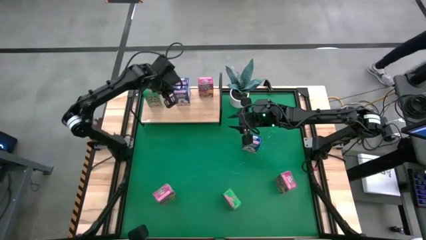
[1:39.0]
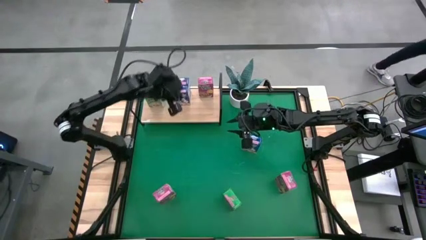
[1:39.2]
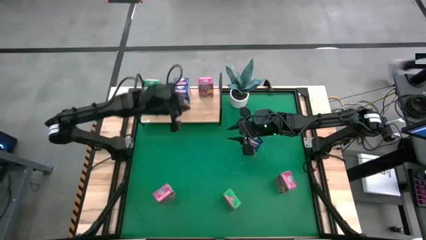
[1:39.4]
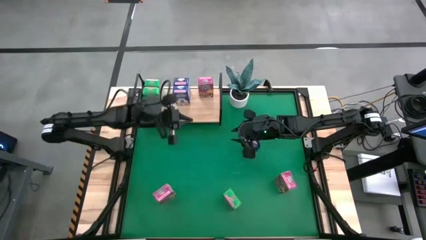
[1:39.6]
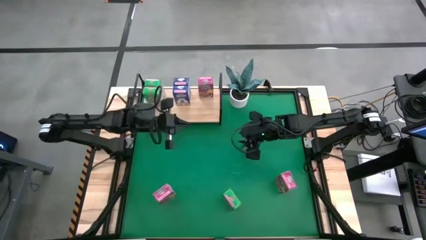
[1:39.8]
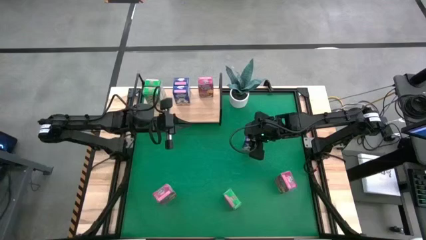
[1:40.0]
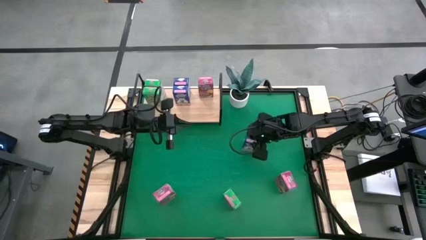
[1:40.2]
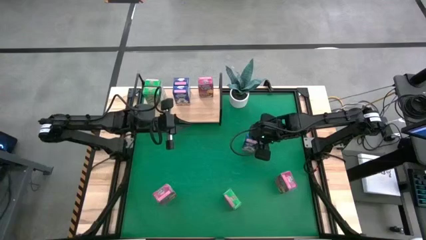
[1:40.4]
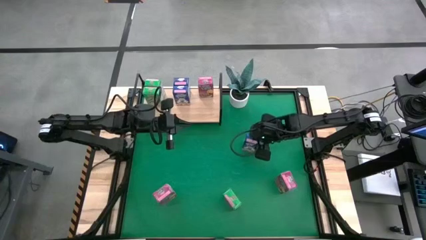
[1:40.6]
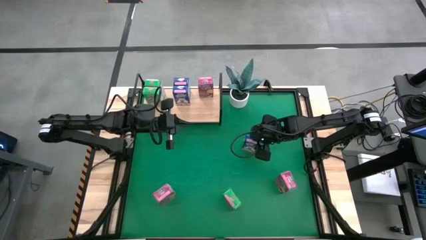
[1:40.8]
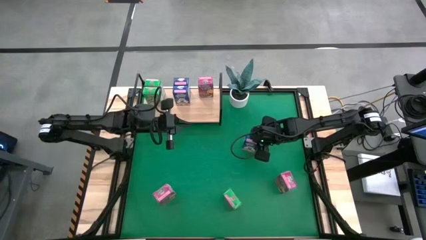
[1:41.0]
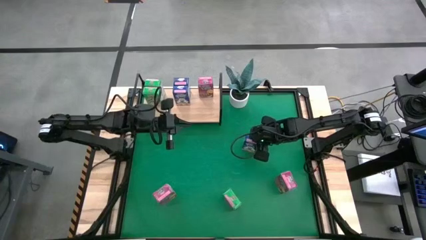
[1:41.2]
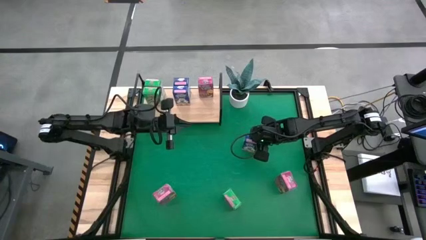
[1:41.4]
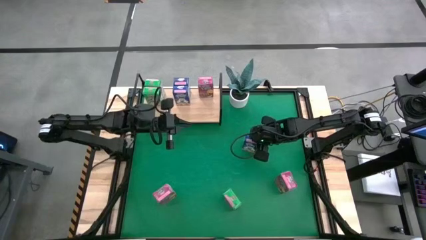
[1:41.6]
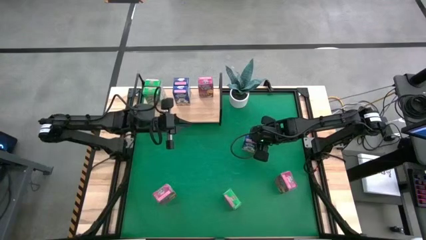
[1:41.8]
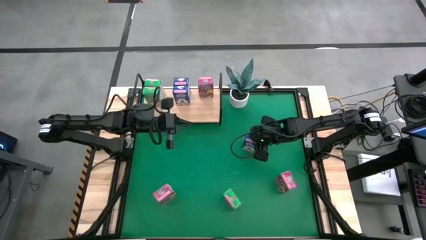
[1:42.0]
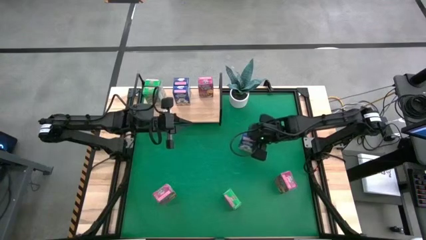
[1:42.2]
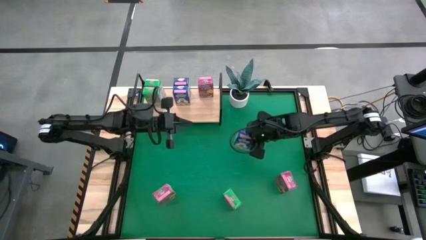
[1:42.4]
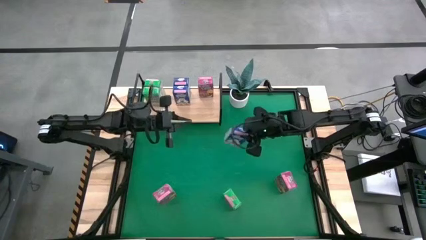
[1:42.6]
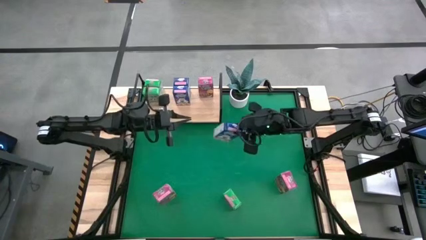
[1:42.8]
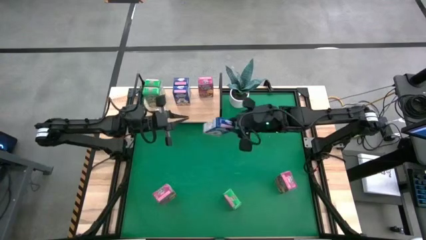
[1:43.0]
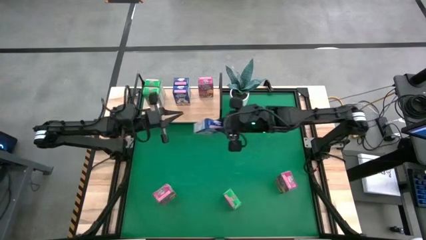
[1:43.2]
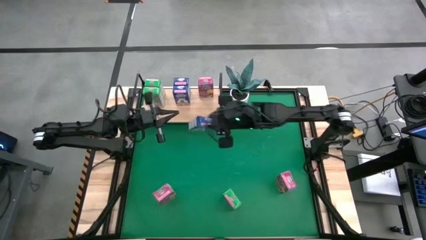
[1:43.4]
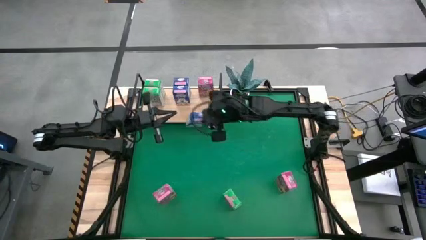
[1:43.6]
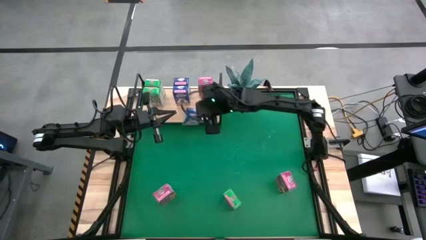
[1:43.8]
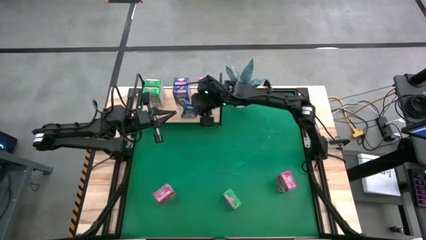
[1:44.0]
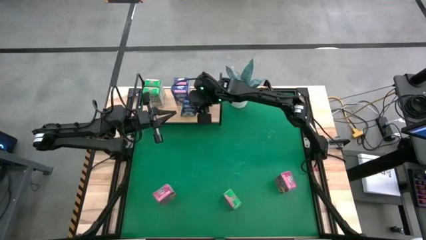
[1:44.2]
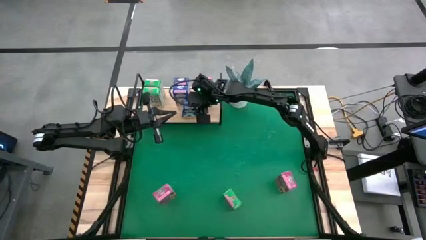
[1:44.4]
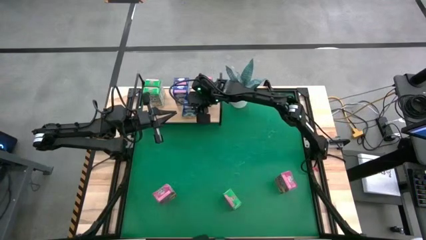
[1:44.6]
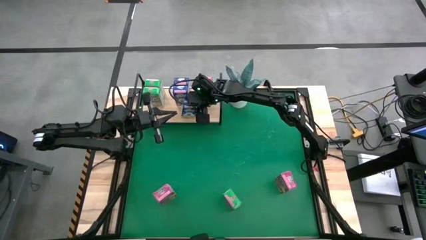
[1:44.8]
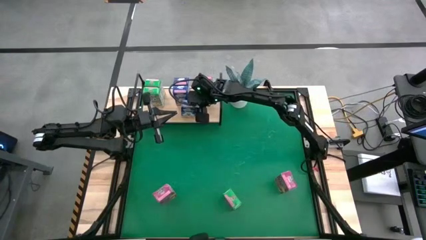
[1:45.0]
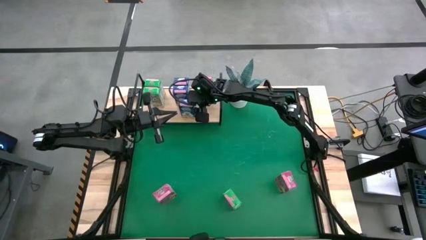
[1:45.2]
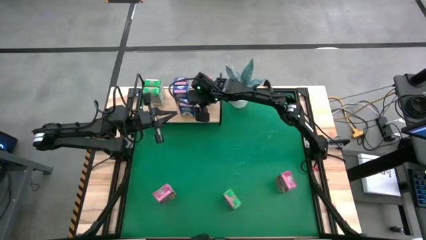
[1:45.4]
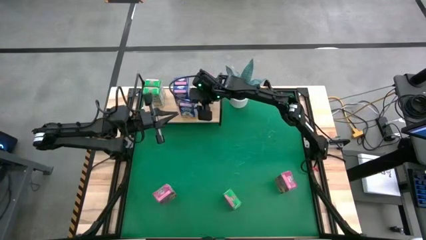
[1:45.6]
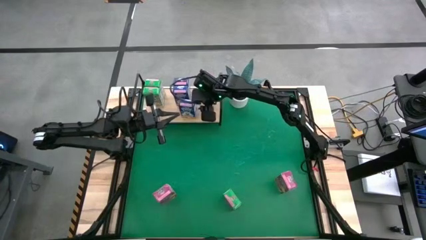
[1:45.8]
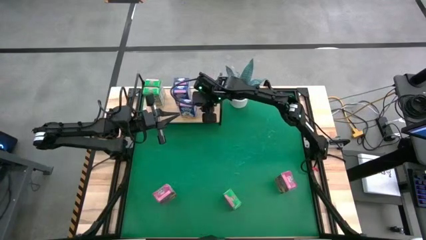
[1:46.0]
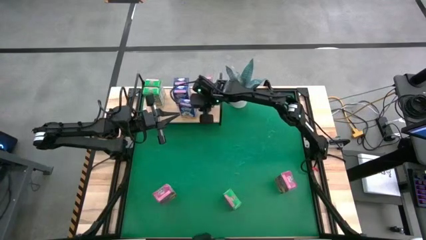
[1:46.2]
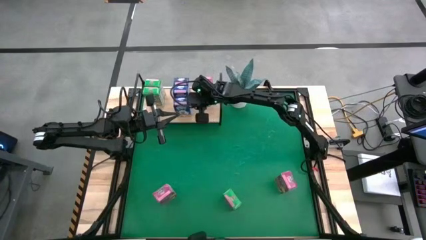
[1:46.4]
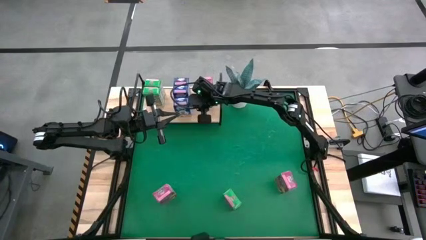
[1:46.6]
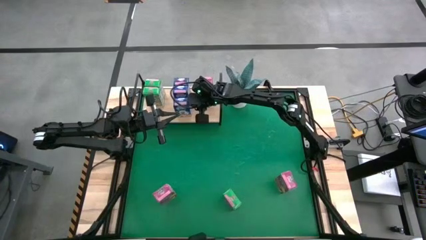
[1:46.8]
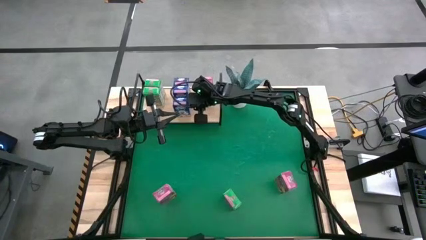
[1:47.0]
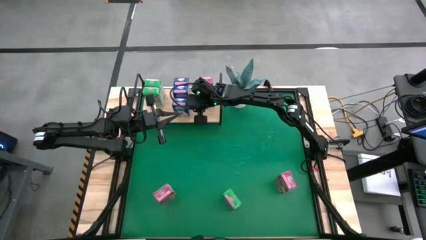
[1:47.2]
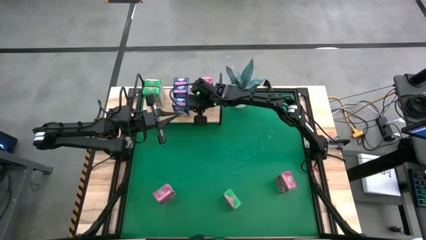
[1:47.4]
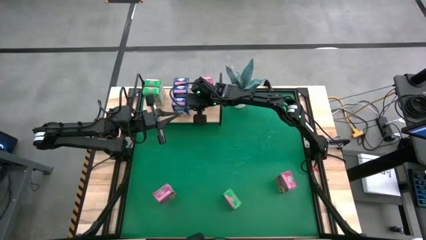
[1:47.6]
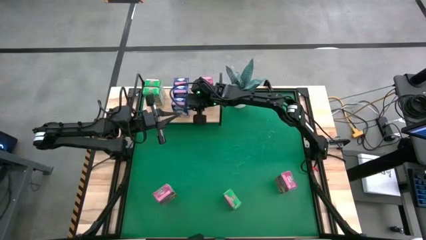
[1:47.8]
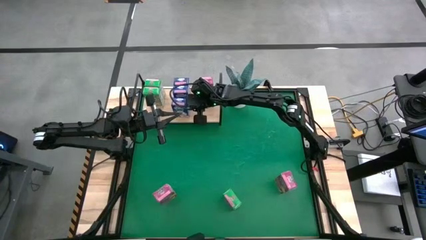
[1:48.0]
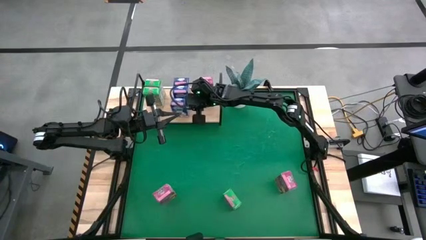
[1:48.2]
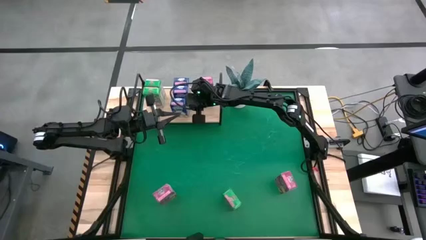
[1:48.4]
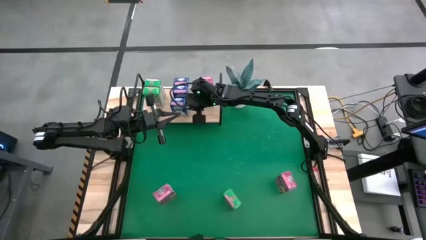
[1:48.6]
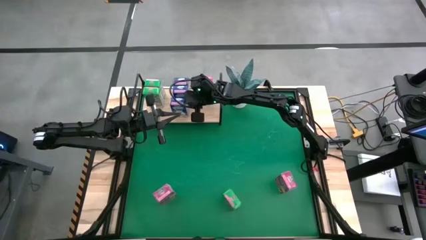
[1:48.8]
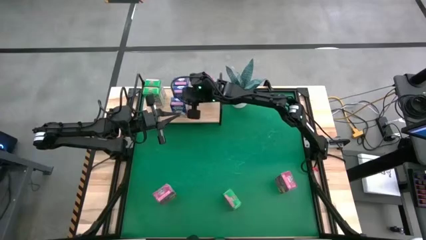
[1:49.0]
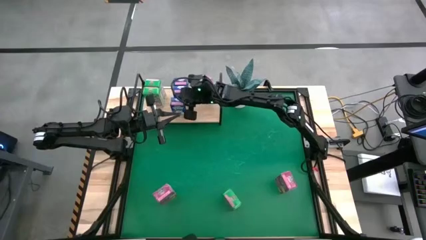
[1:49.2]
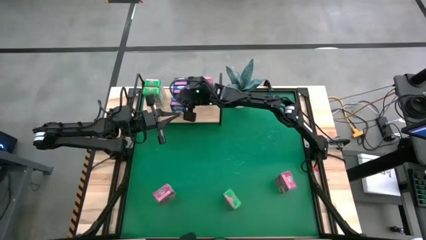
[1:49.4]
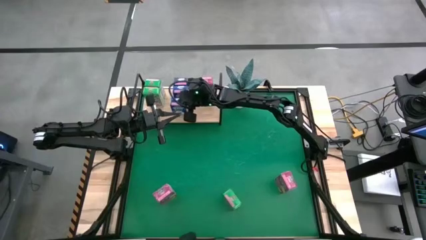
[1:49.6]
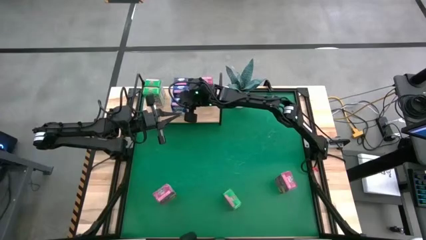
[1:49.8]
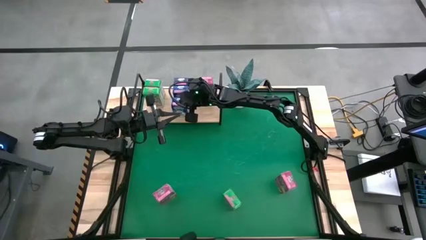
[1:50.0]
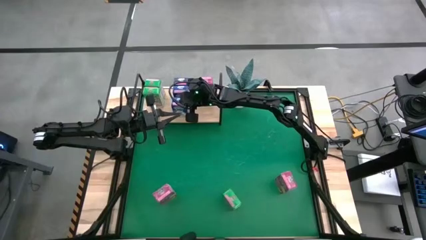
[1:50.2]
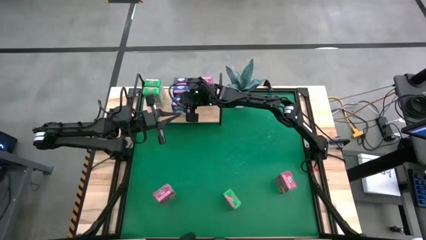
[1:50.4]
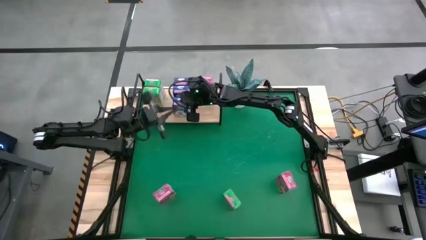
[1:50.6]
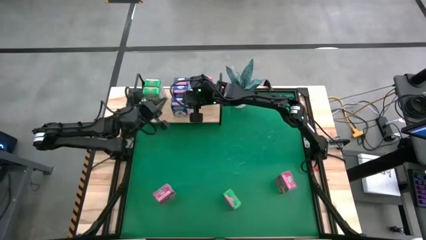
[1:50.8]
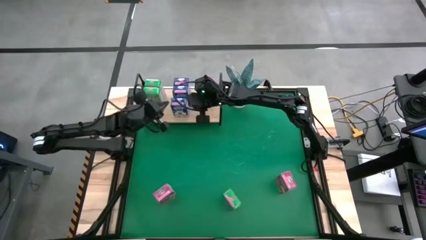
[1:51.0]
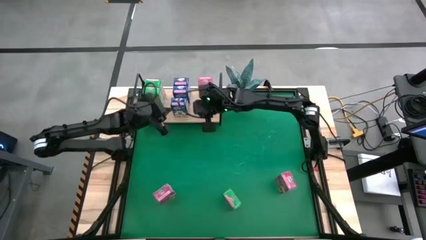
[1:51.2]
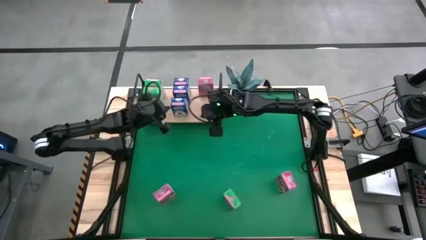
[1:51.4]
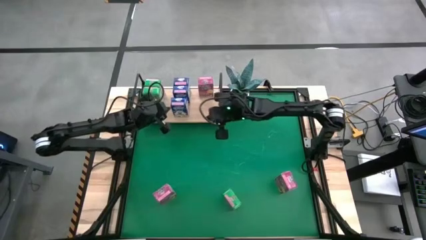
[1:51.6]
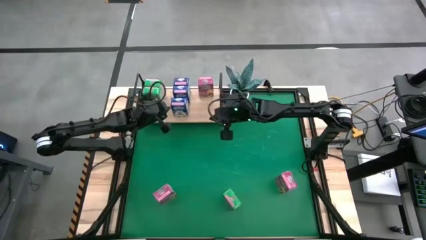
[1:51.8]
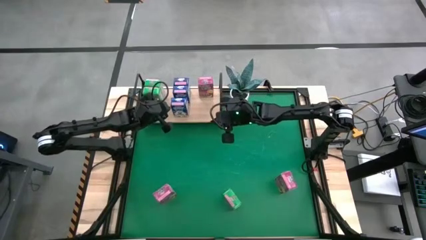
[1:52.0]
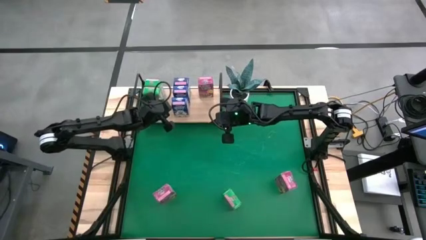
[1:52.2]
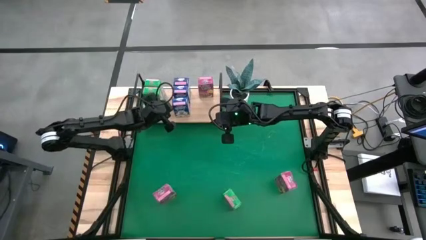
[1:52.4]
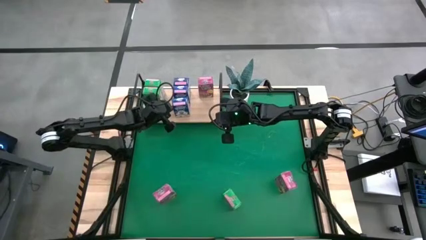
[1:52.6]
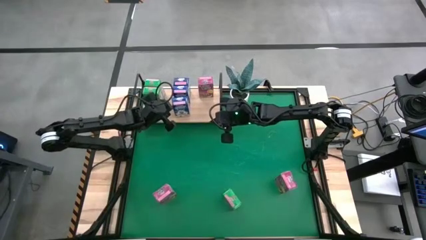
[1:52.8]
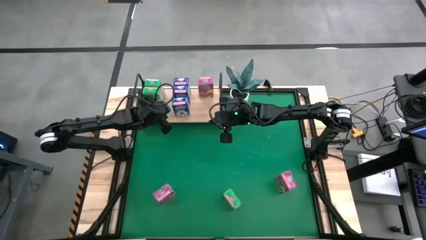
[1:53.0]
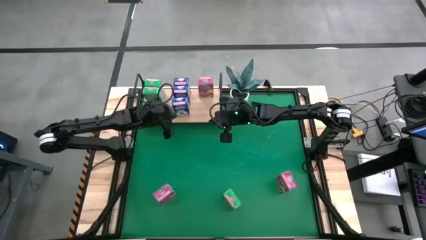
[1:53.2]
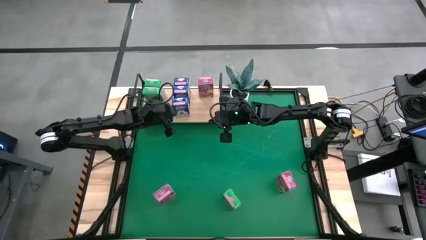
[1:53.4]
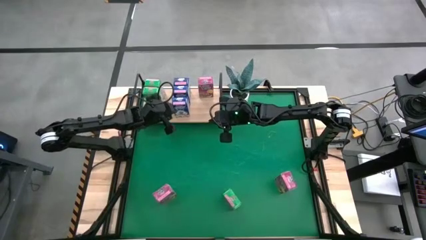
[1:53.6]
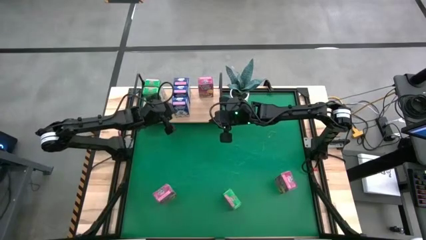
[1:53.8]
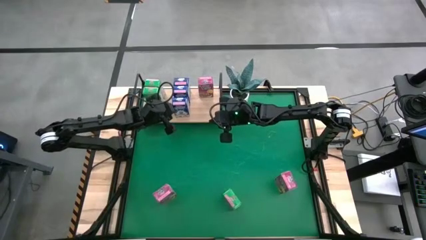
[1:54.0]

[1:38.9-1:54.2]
Task: Stack cereal on shelf
Put the blue cereal box on the shelf aligned with the other blue cereal boxes
